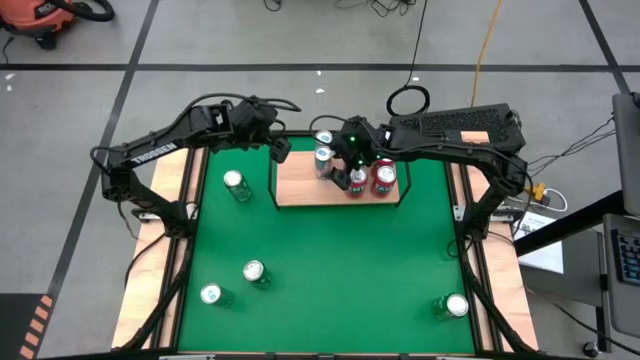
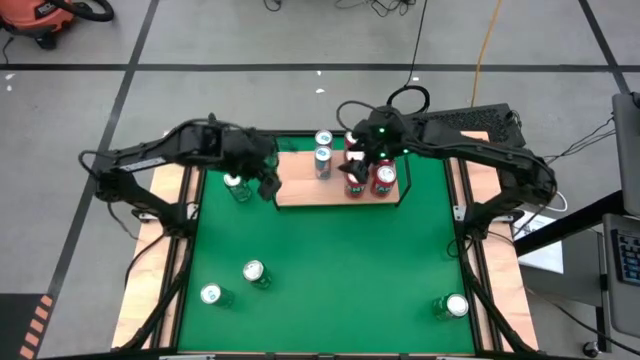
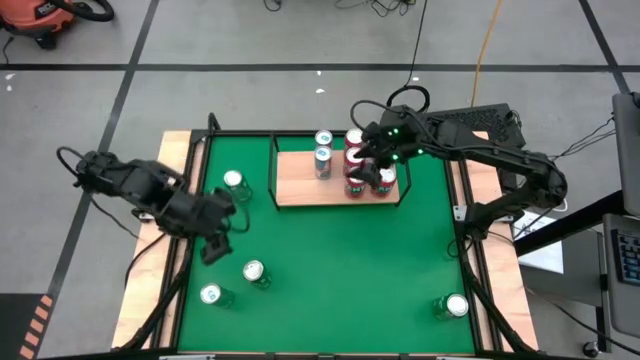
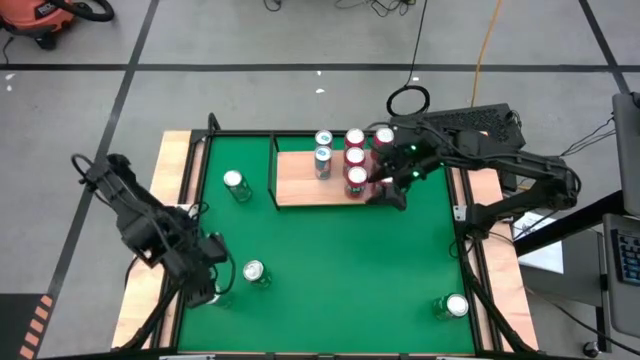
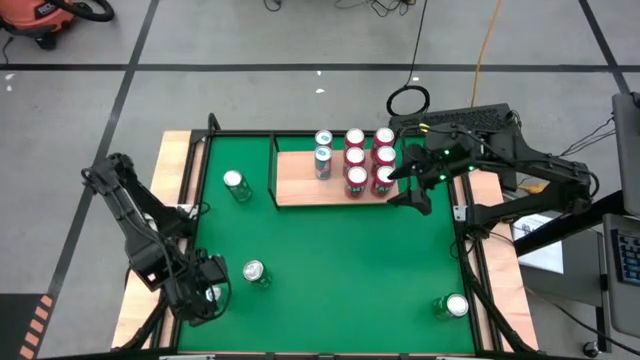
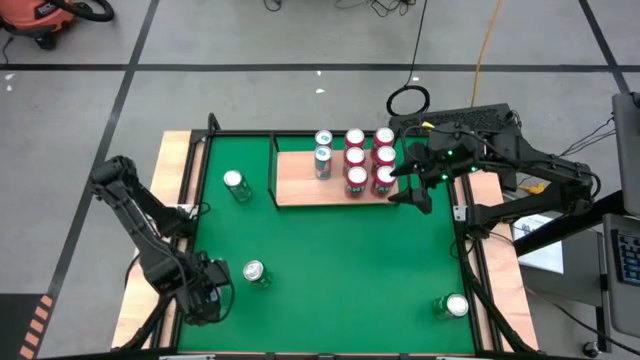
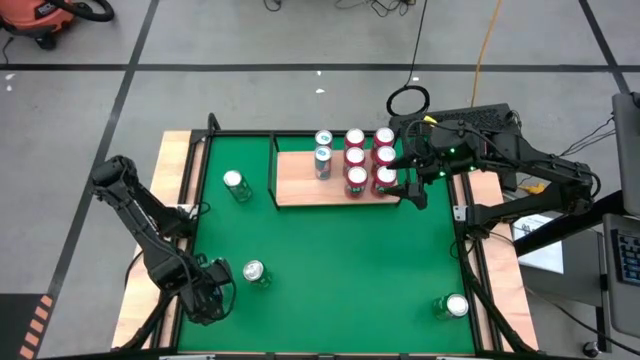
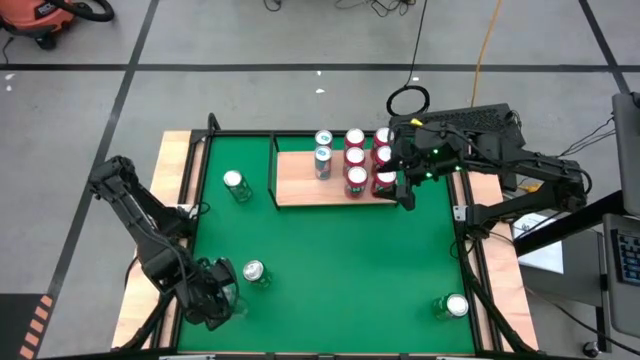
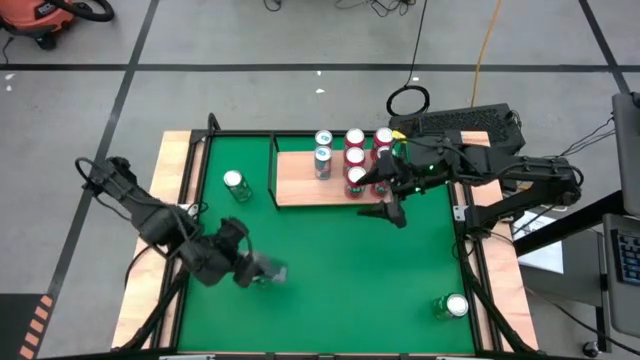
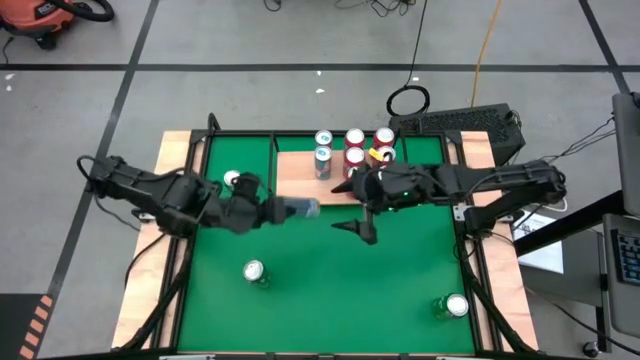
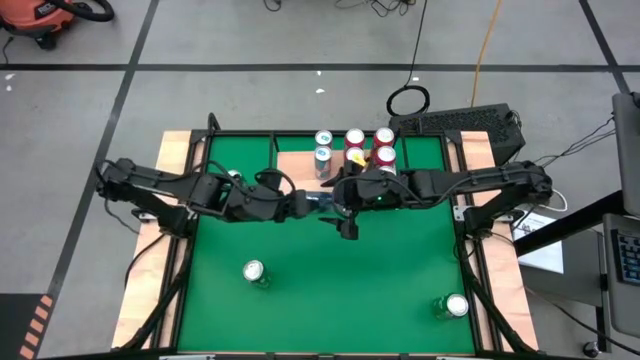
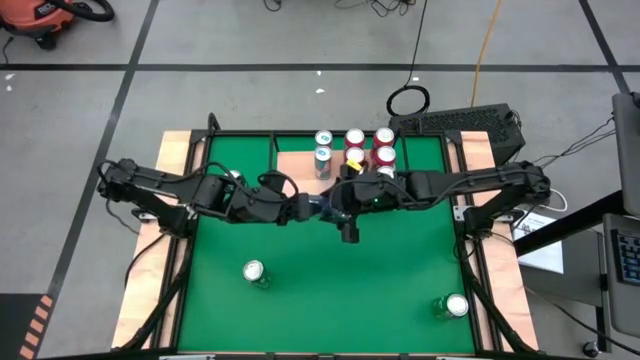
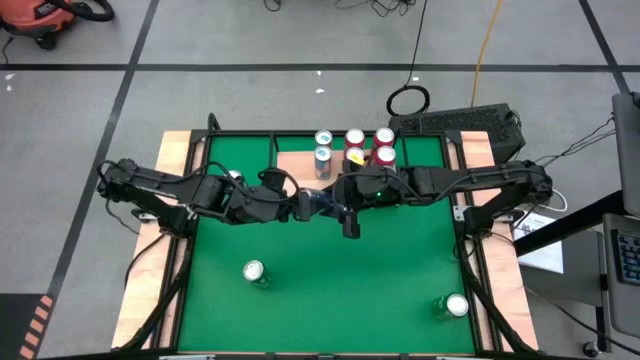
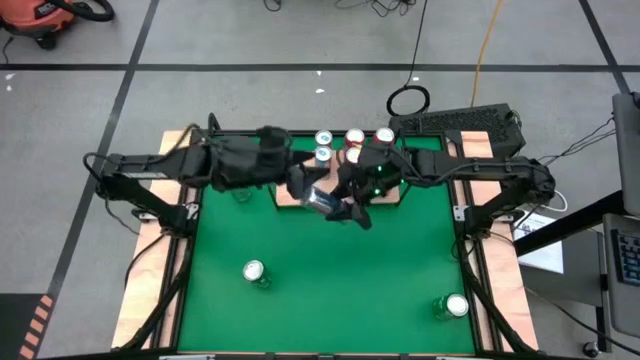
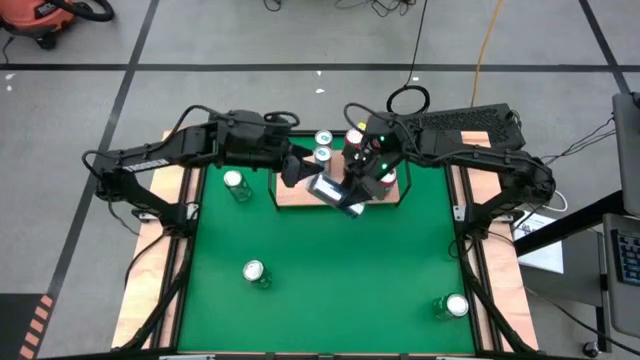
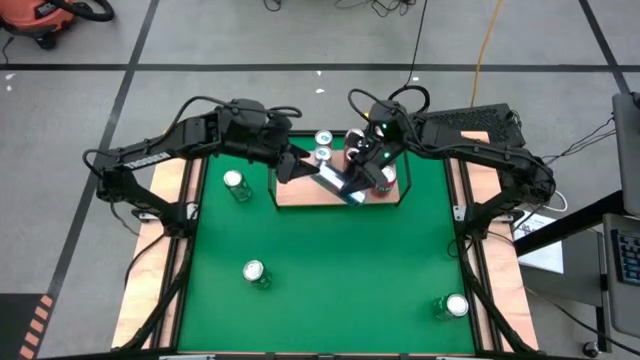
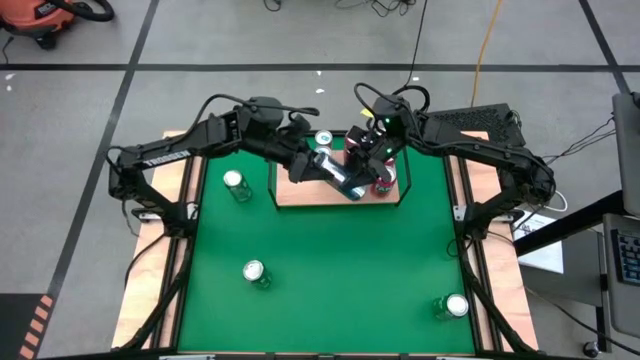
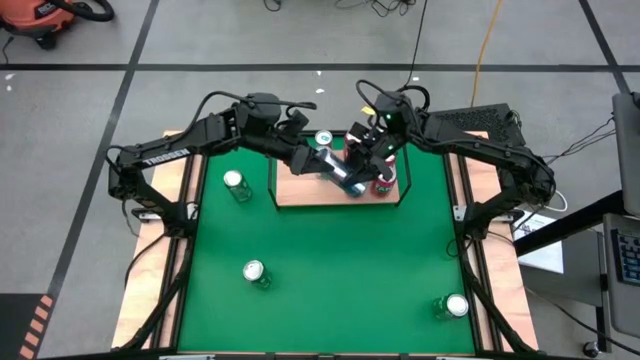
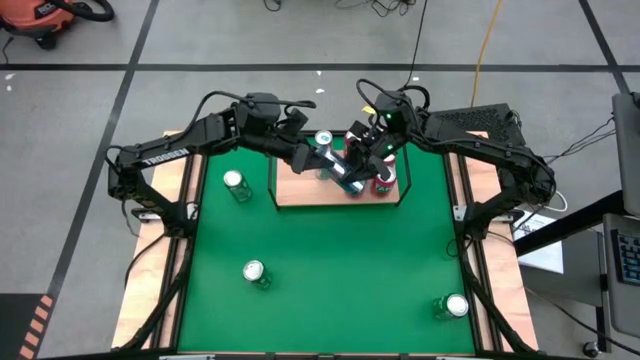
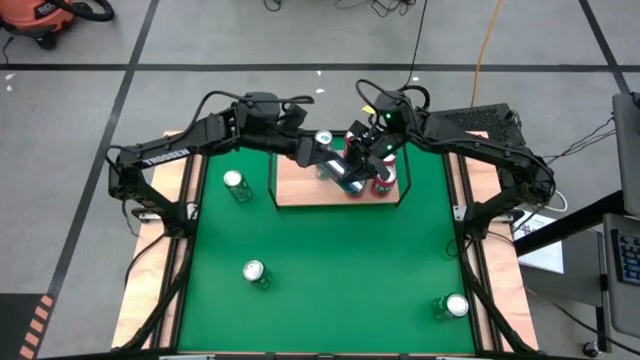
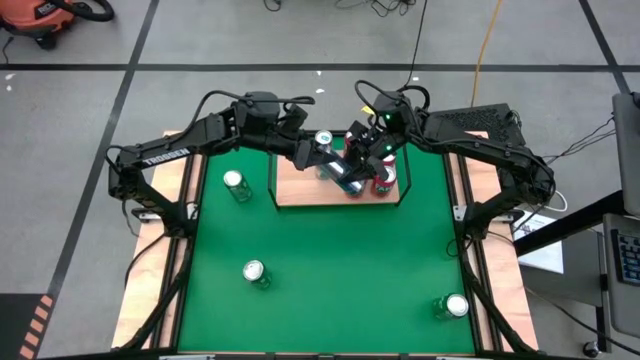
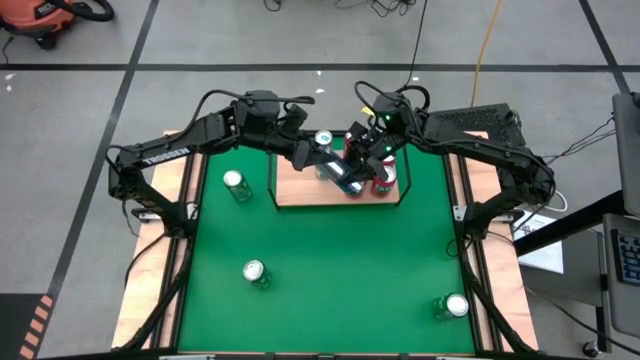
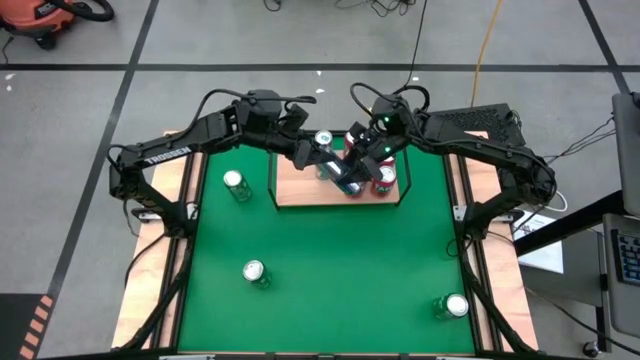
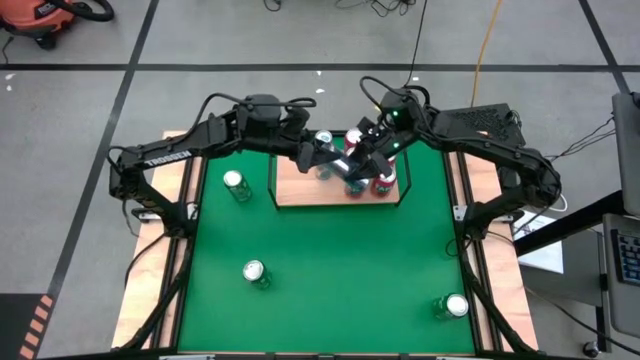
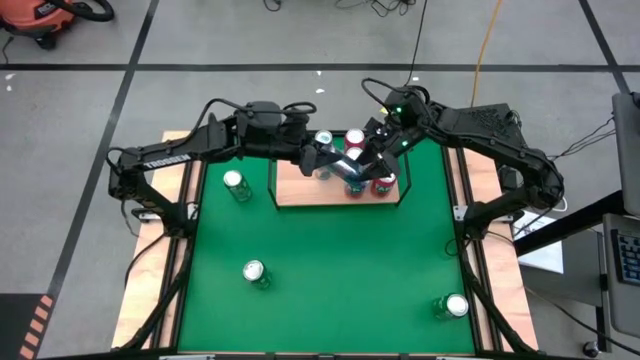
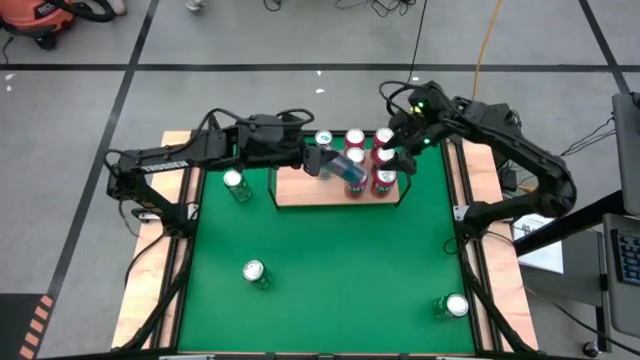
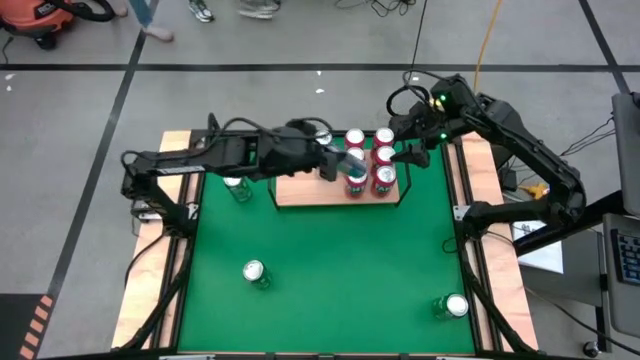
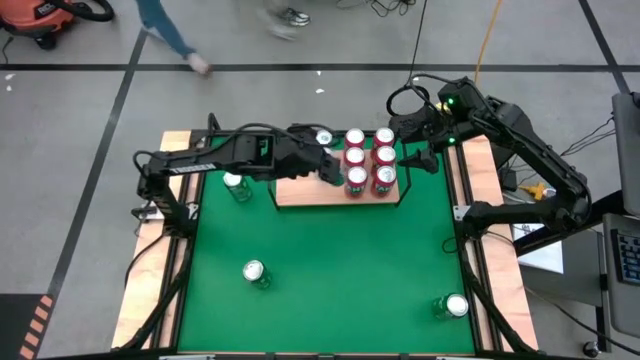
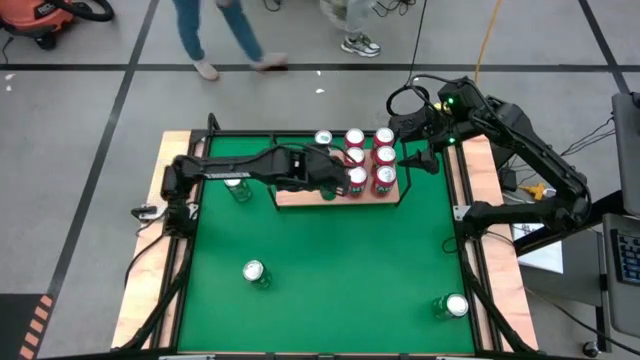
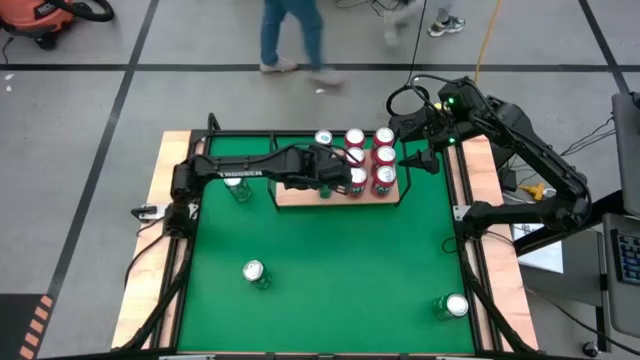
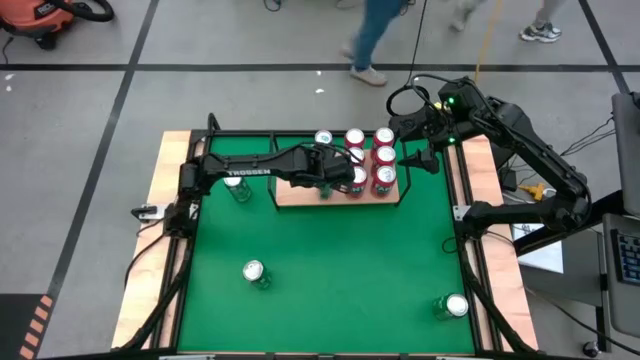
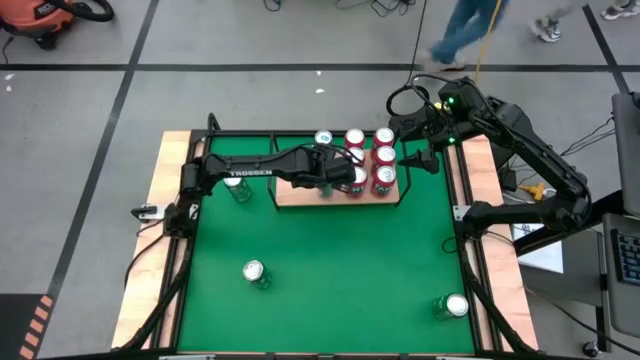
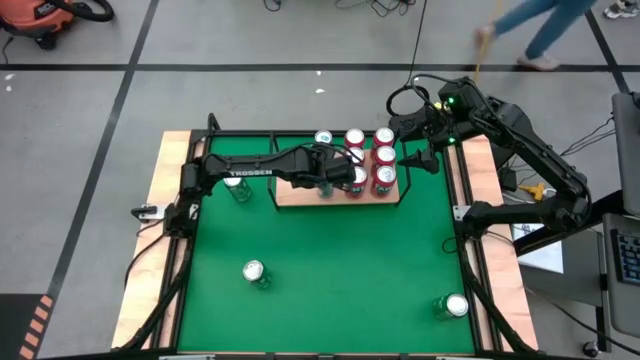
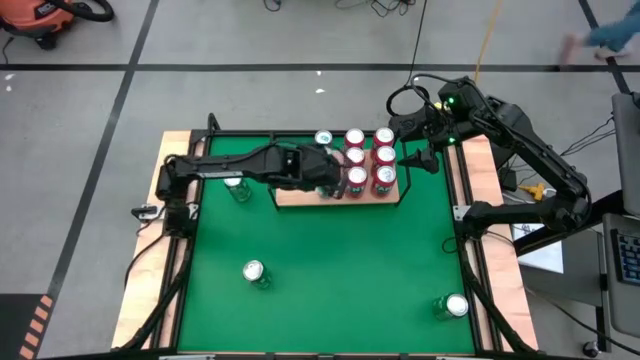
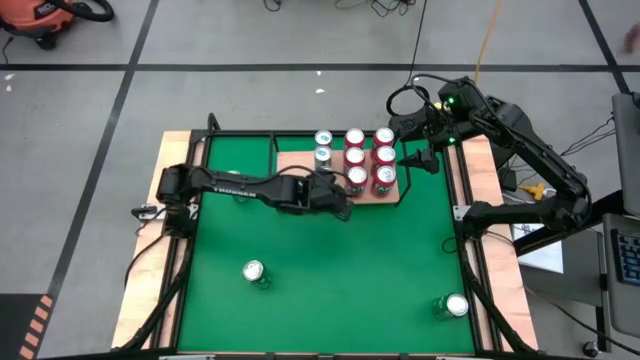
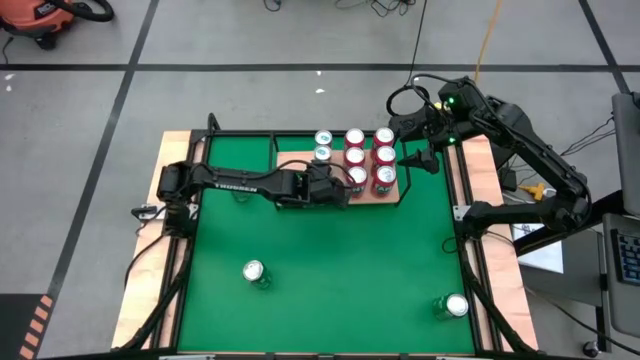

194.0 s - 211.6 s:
Task: Place canned beverage on shelf
Put the blue soda can on the shelf aligned with the other blue soda can on the shelf

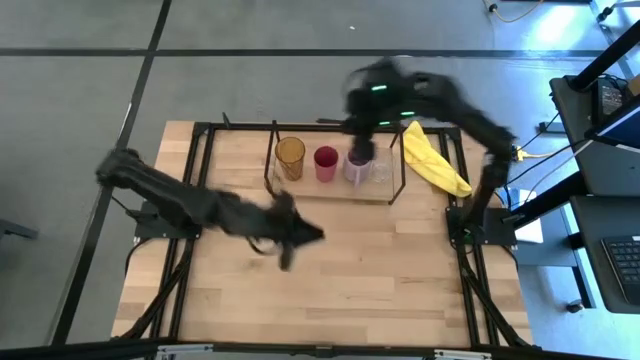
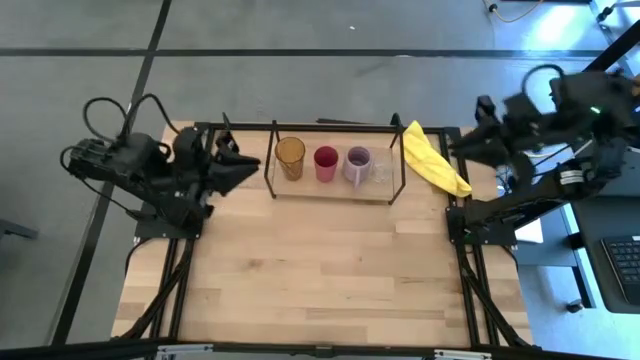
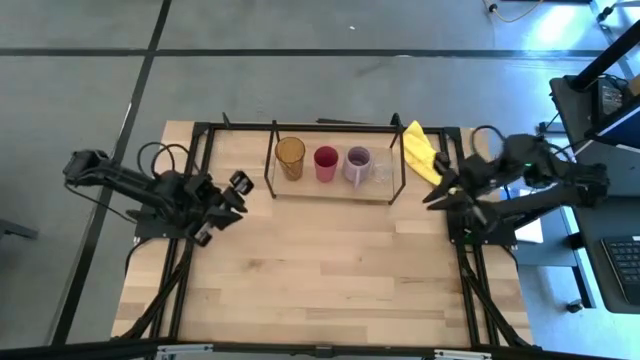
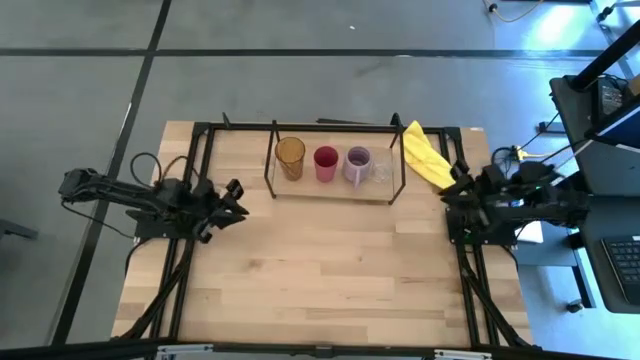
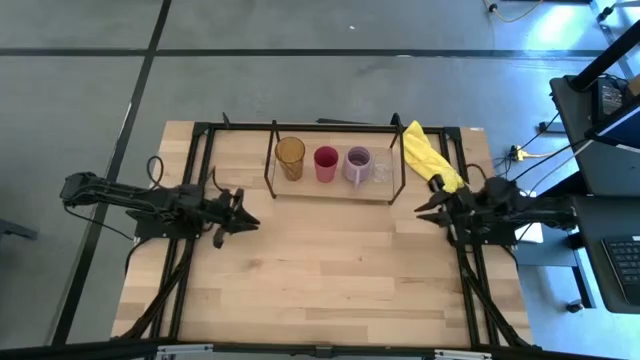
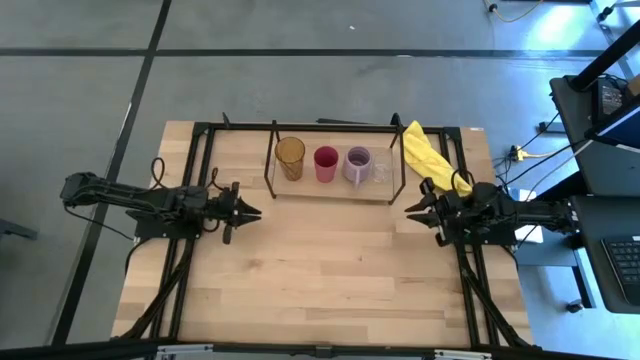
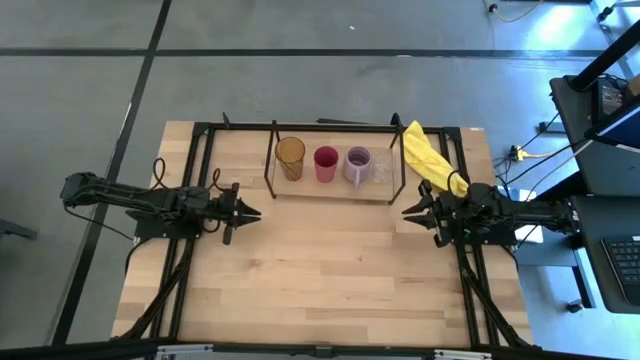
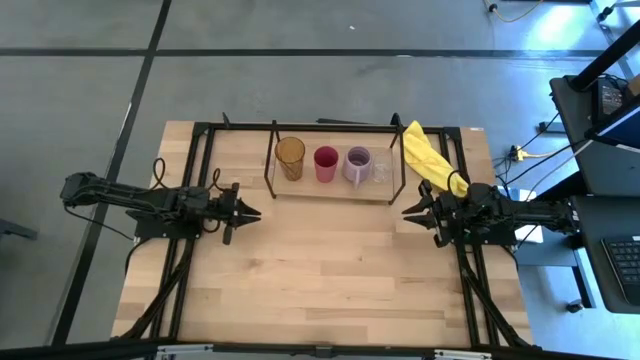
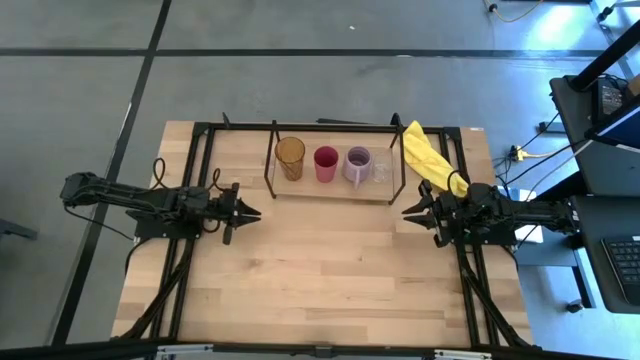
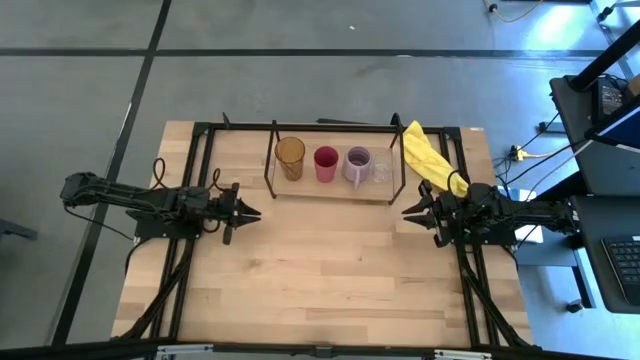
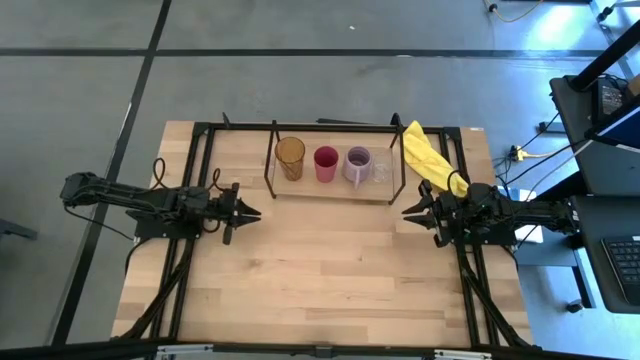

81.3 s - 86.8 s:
Task: Stack small to large cups/mugs on shelf
Return to Home Position
